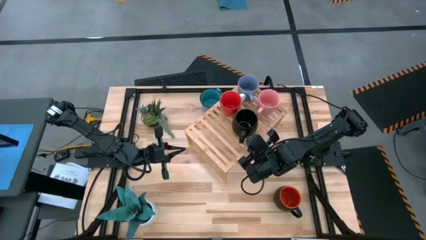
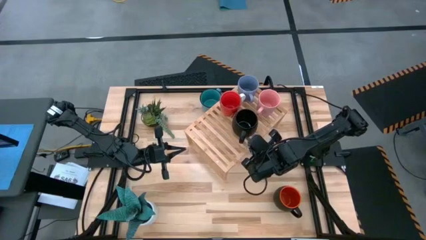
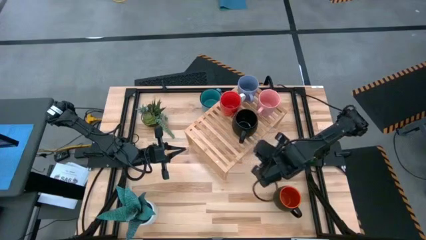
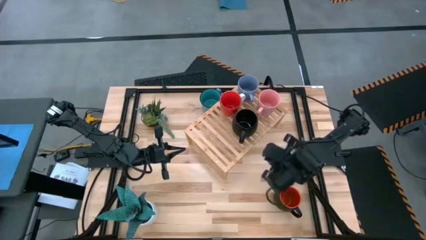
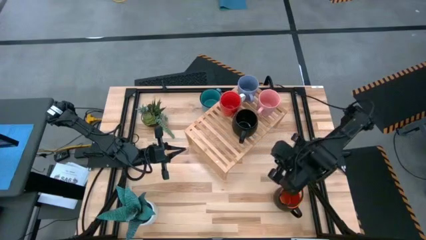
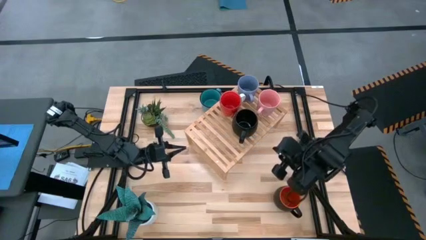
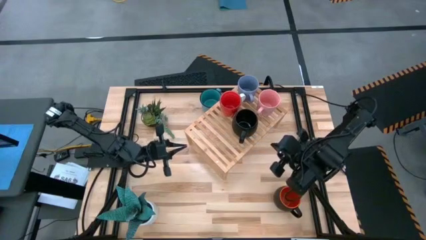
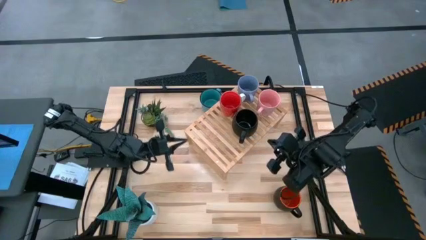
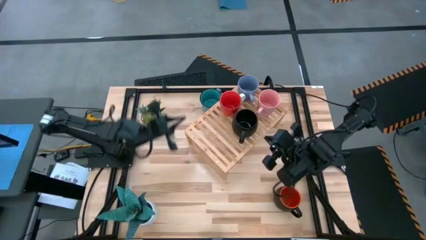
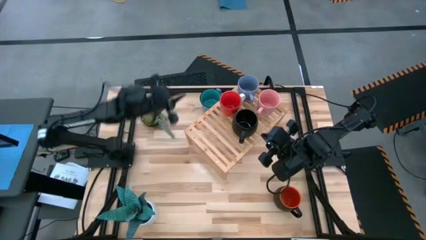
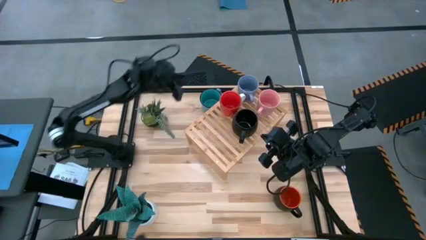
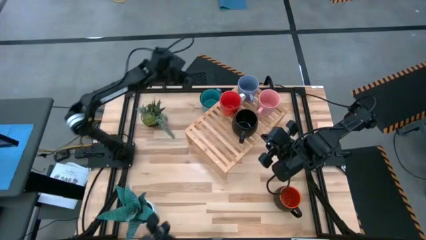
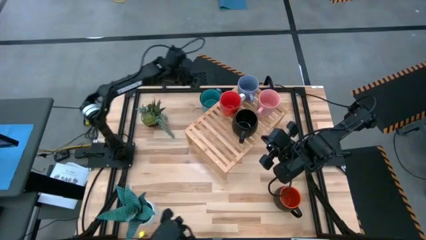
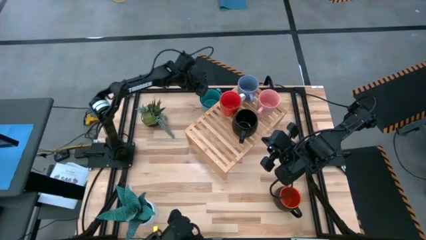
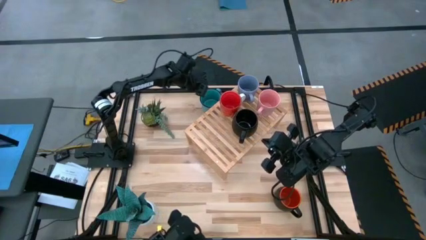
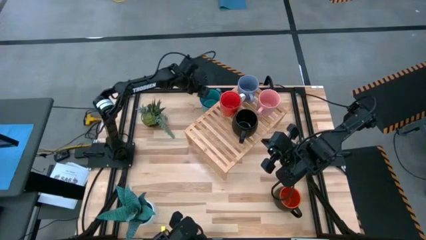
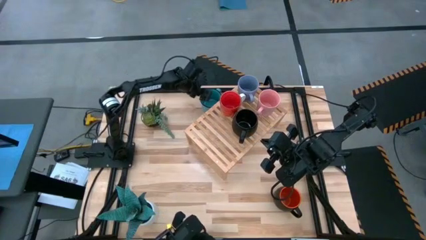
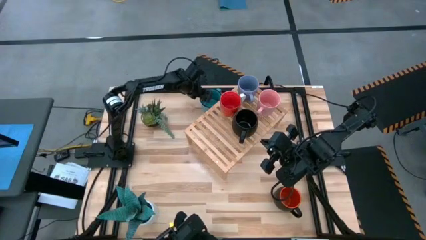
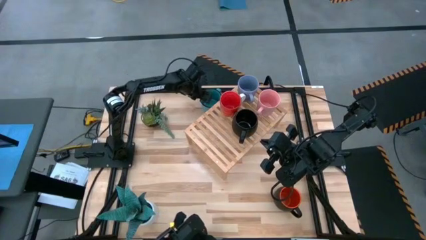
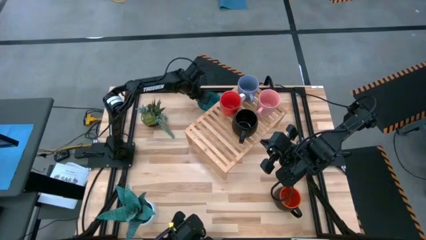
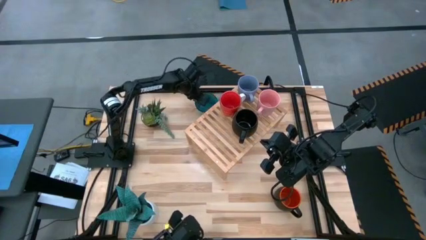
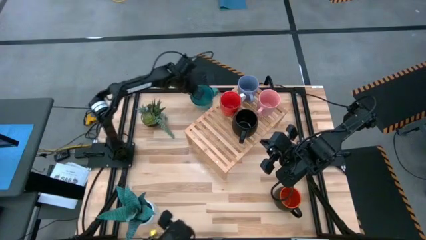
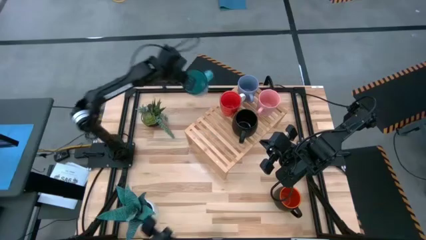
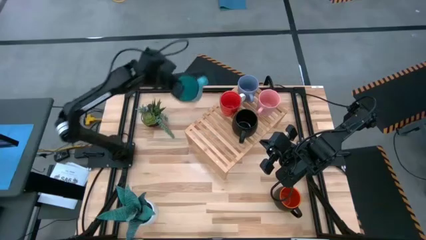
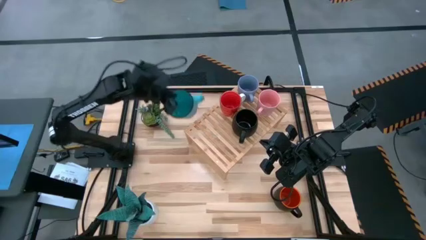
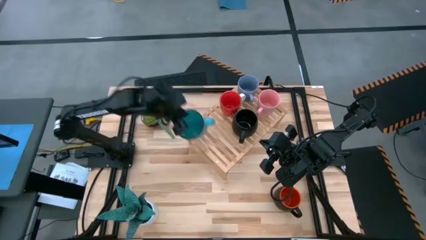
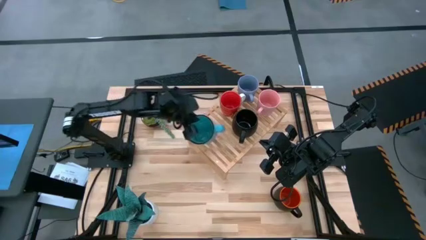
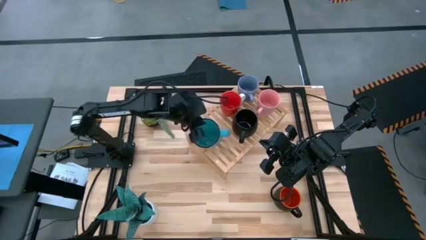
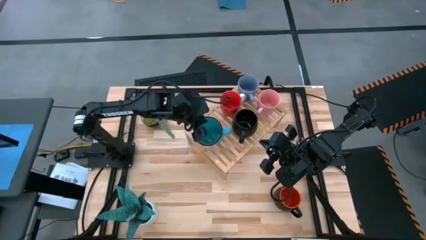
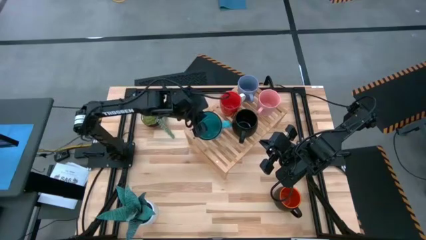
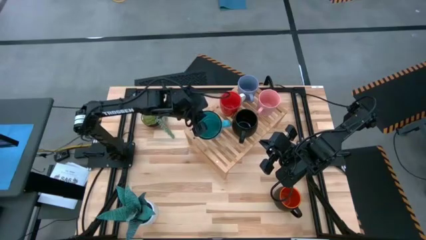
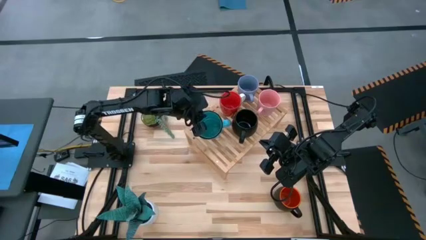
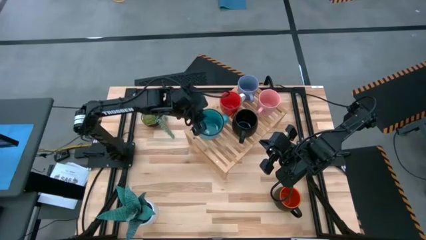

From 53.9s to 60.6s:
Task: Place coffee mugs
Put the blue mug on the shelf

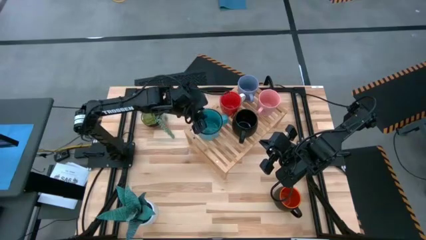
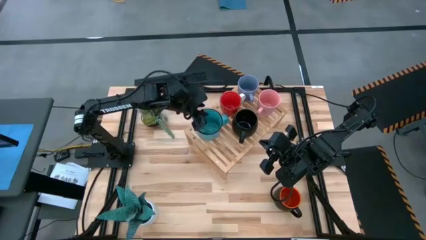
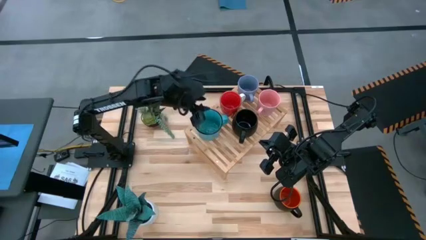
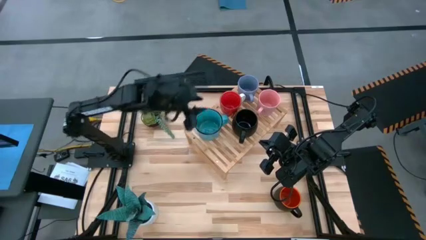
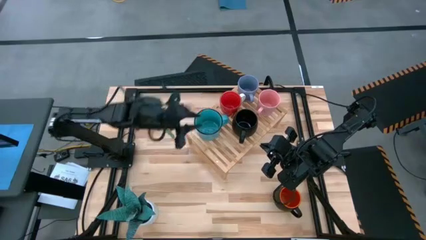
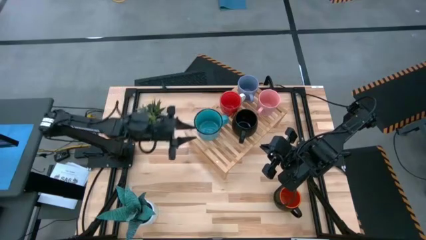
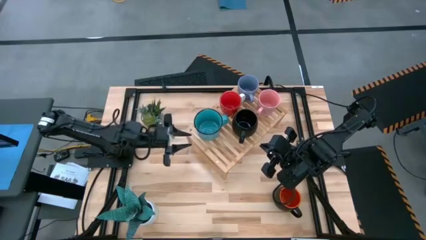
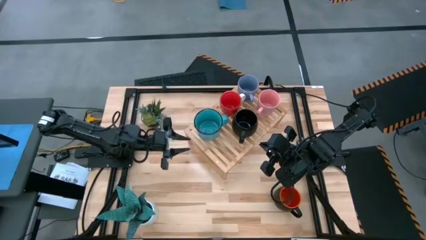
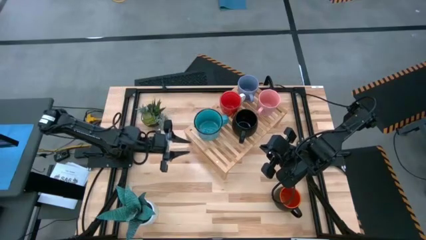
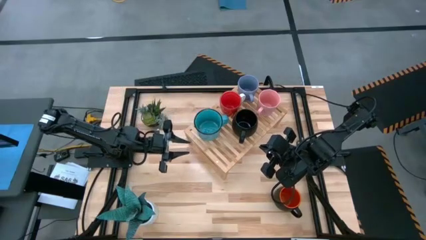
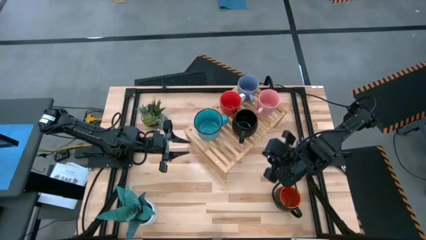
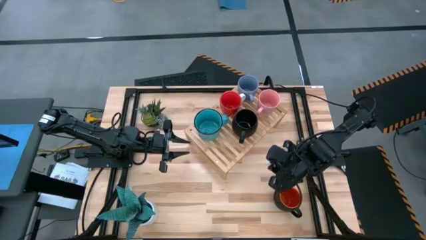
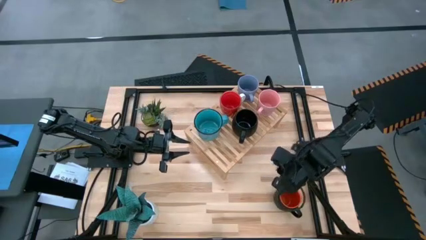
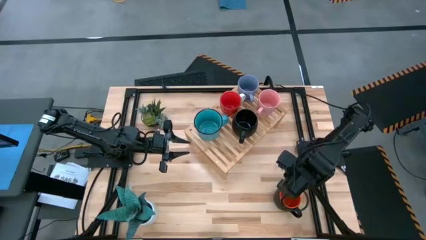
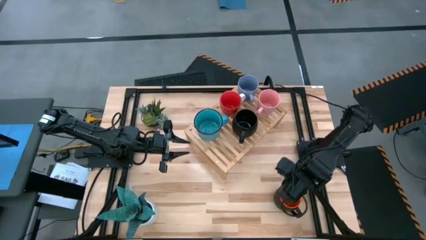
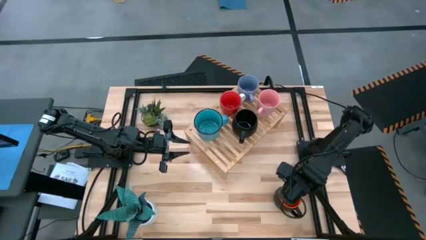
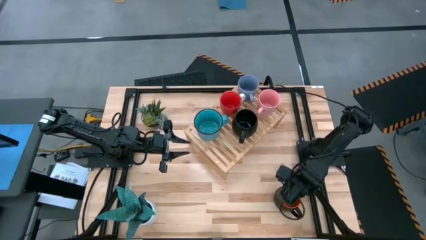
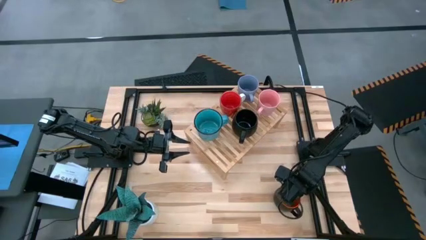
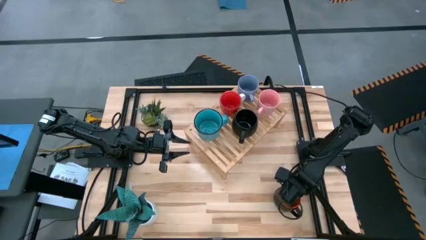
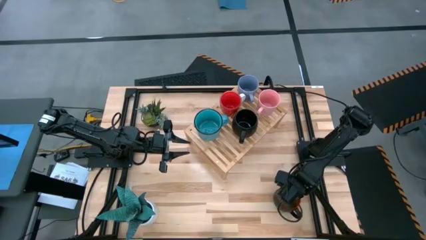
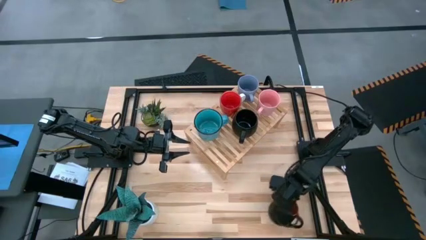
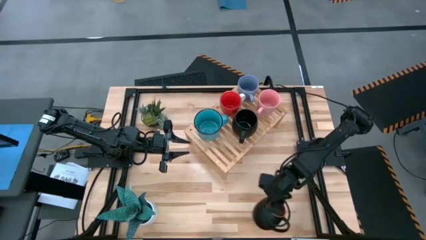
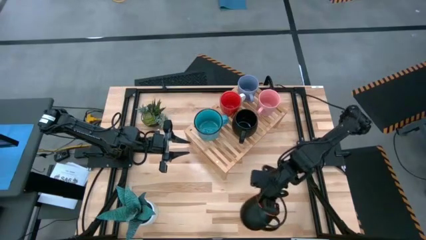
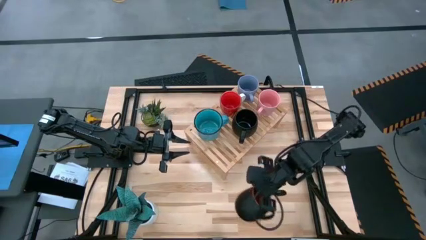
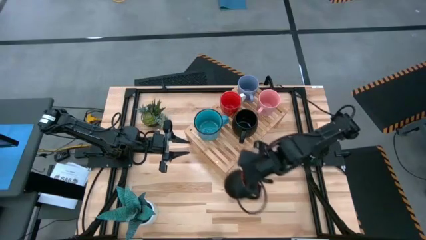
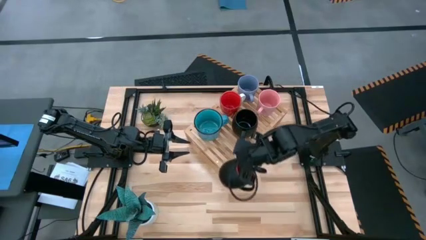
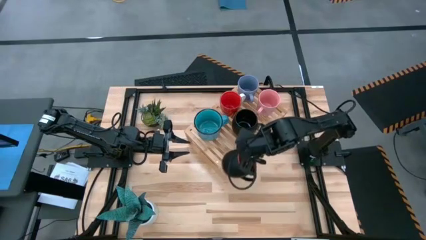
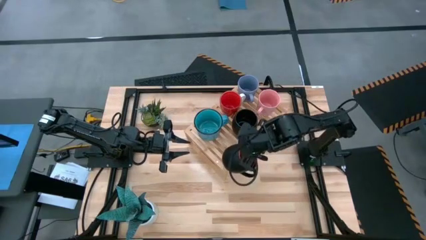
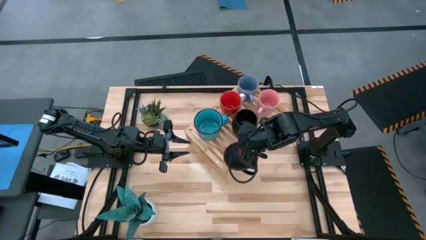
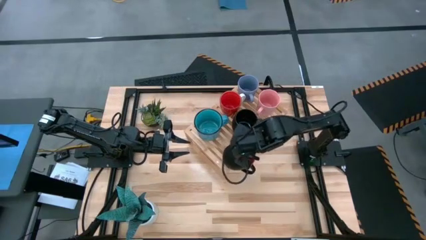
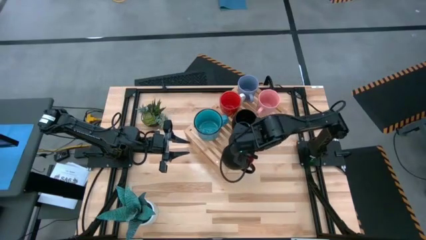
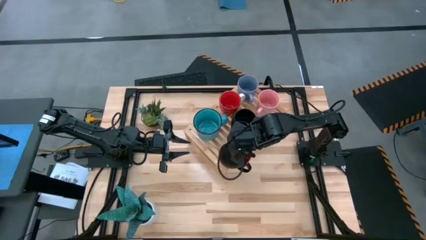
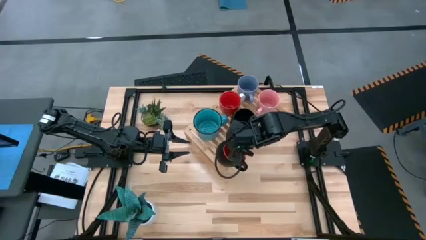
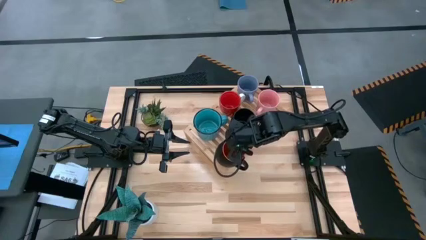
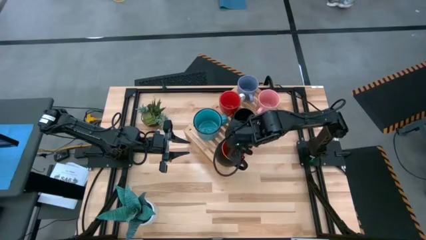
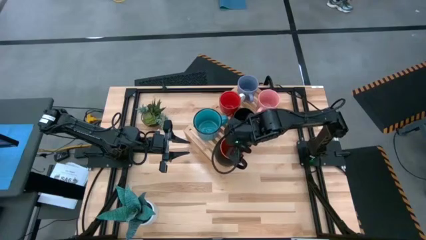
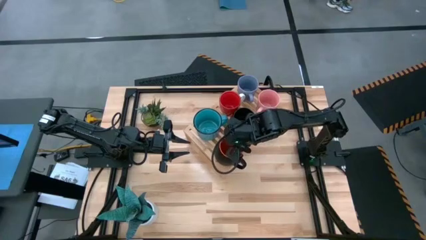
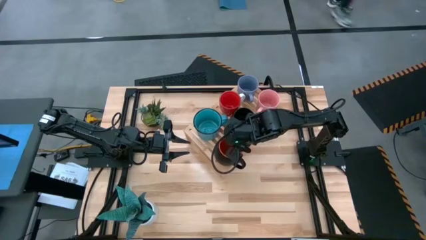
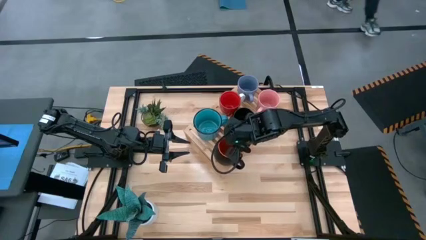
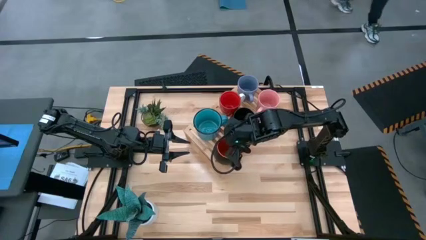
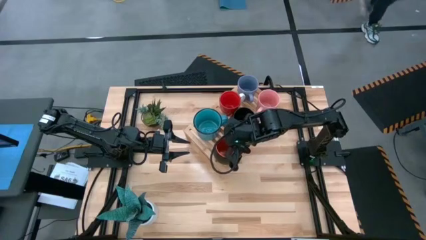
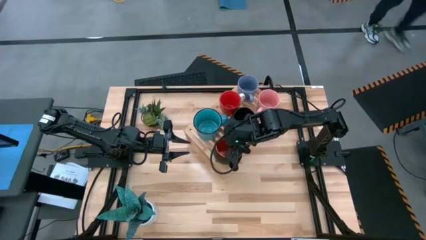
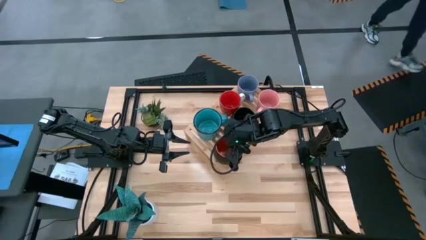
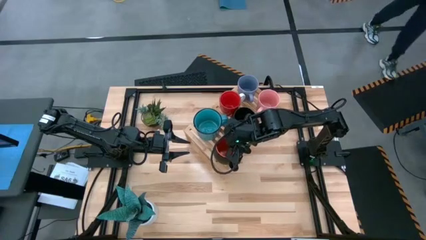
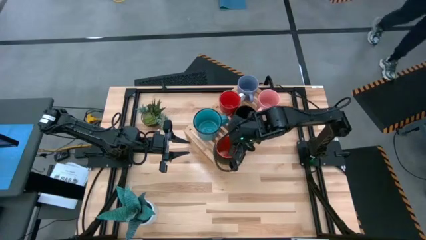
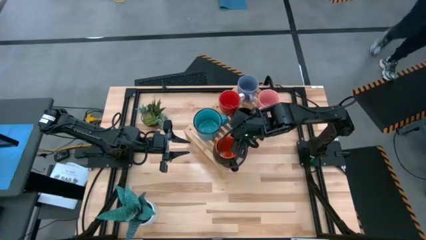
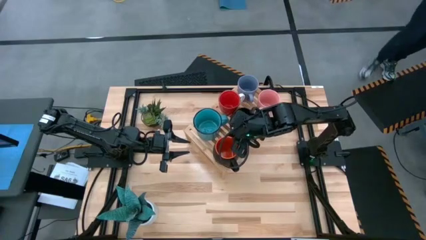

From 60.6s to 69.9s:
Put the orange black mug on the shelf
